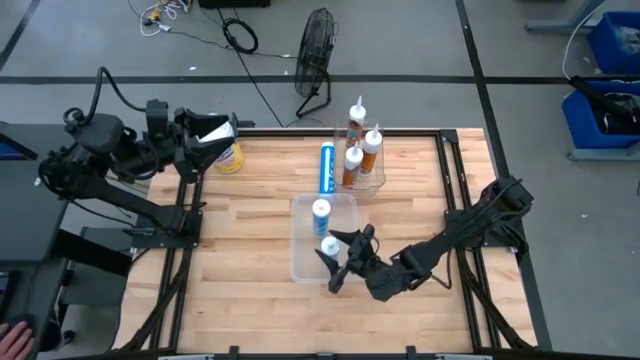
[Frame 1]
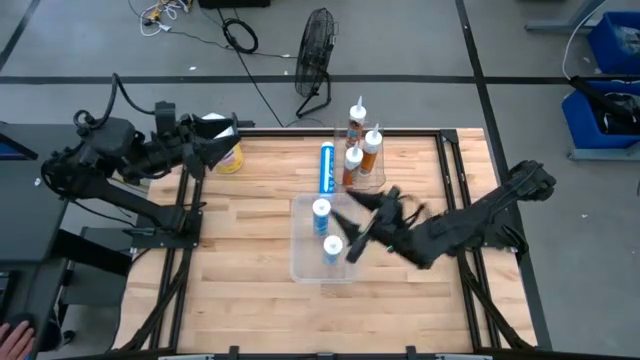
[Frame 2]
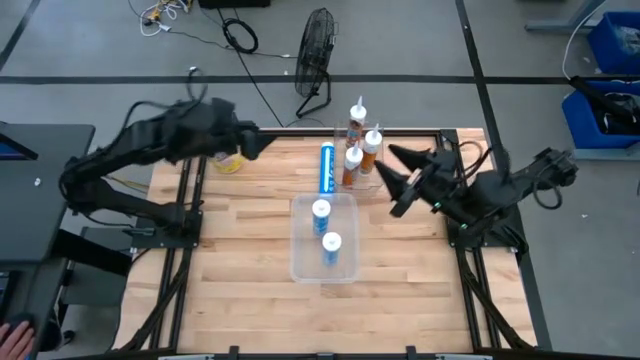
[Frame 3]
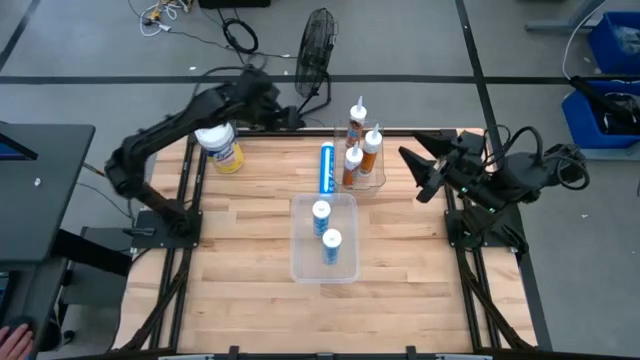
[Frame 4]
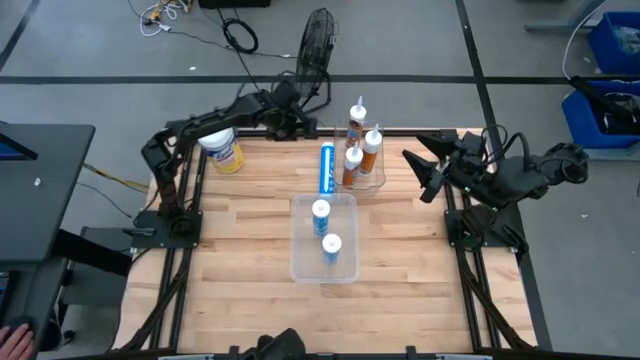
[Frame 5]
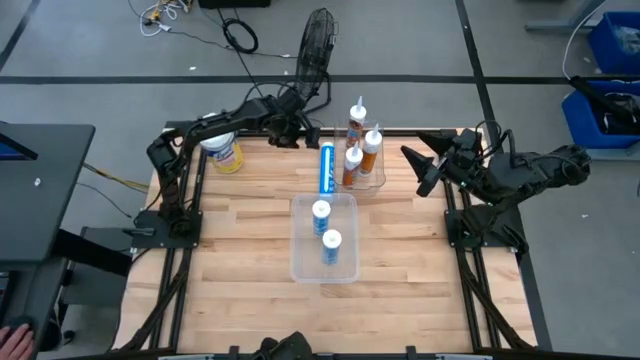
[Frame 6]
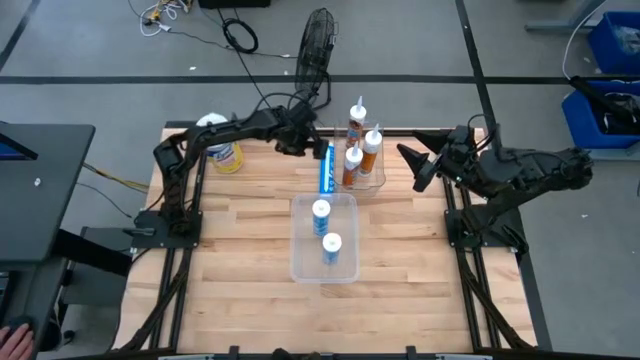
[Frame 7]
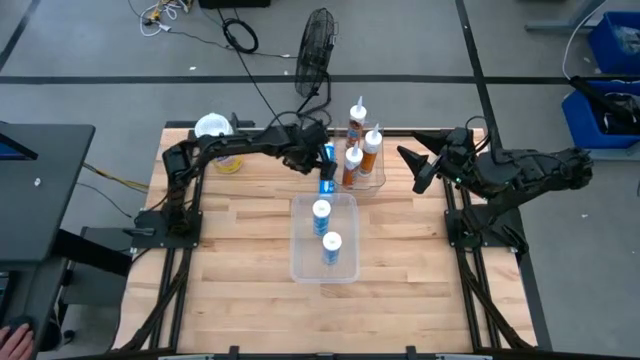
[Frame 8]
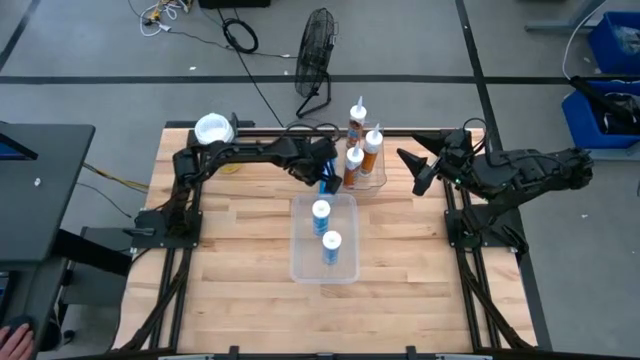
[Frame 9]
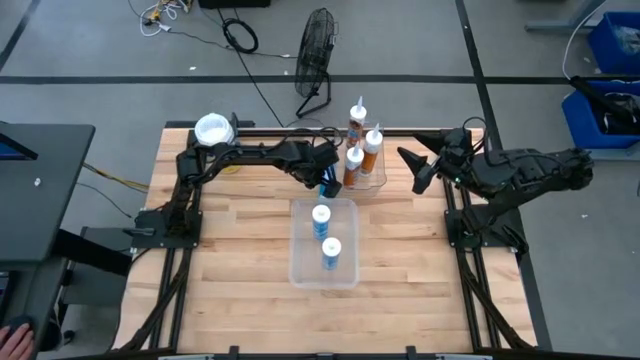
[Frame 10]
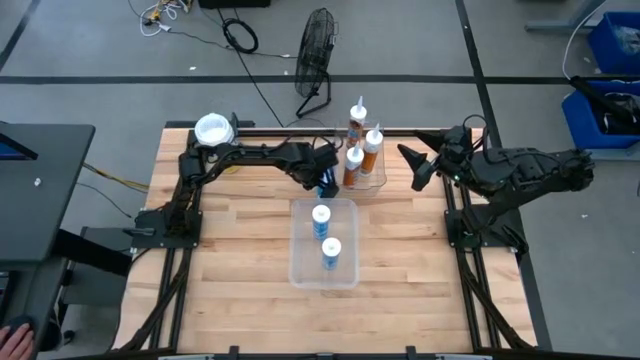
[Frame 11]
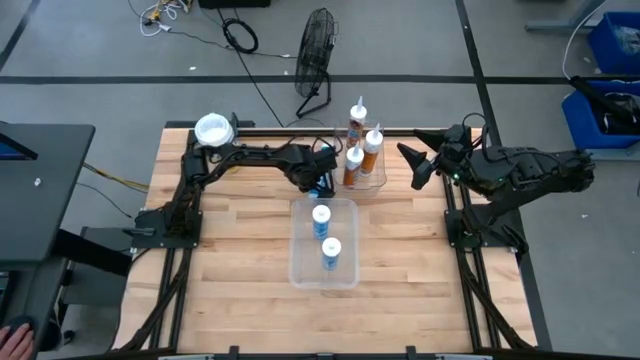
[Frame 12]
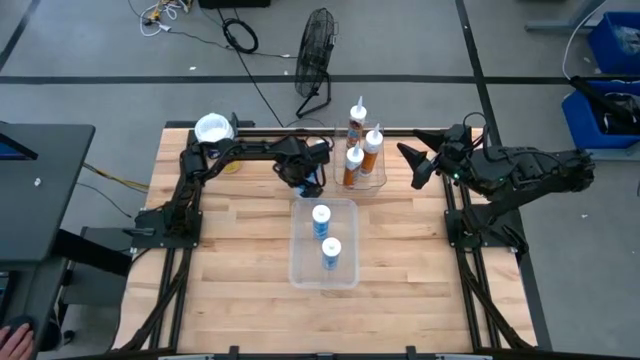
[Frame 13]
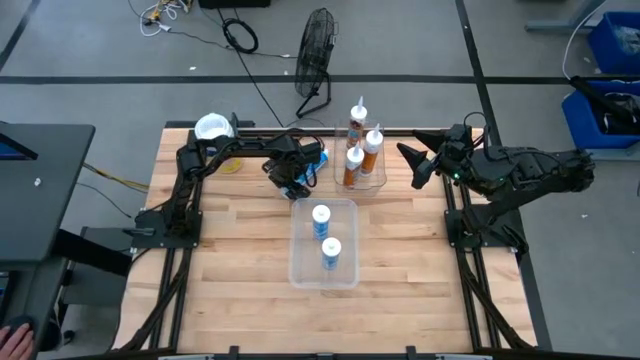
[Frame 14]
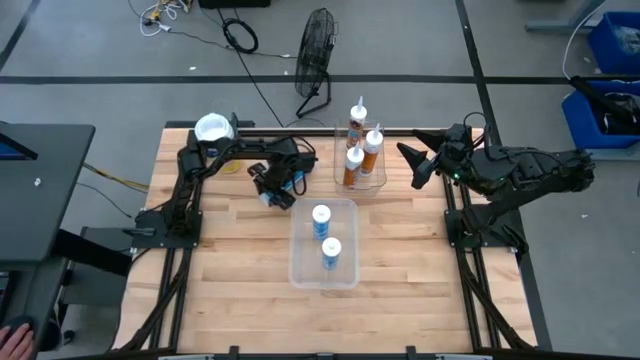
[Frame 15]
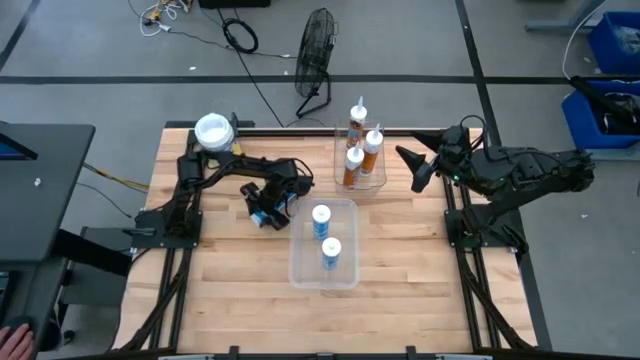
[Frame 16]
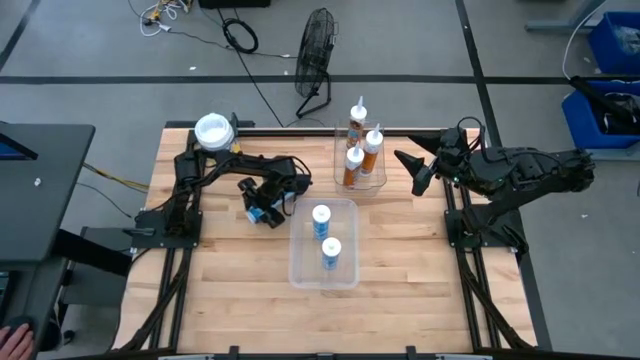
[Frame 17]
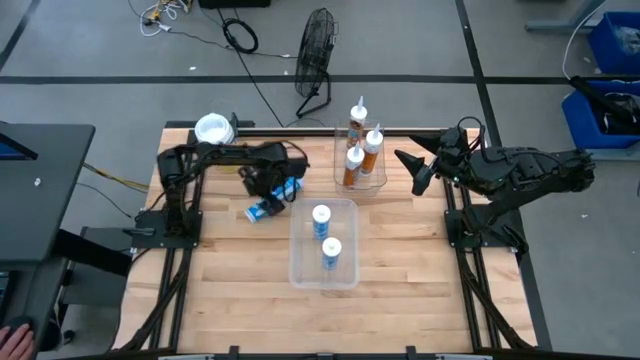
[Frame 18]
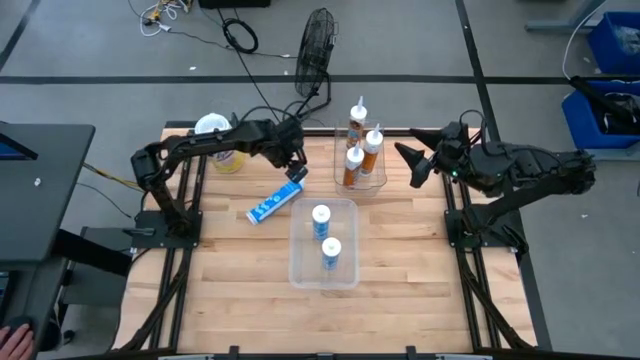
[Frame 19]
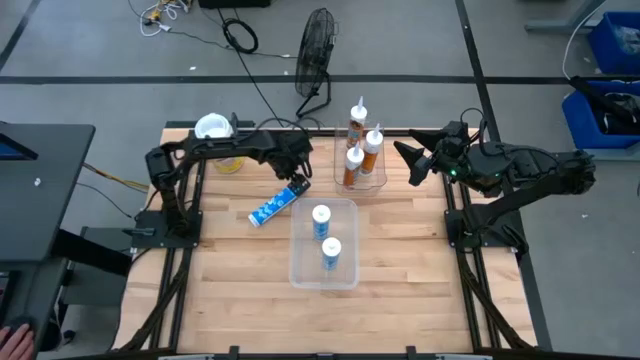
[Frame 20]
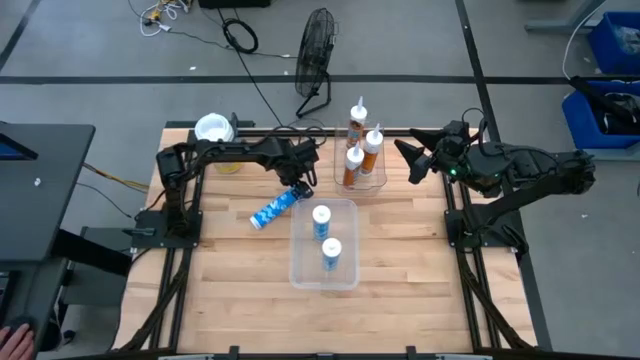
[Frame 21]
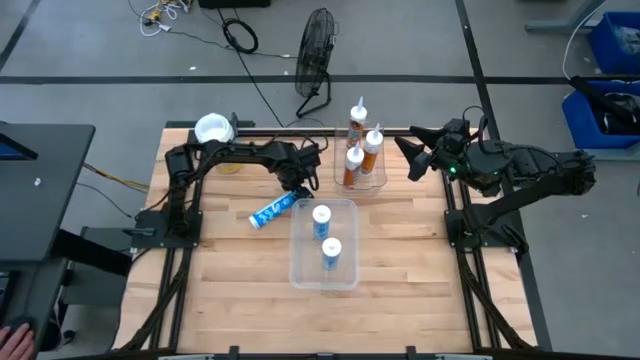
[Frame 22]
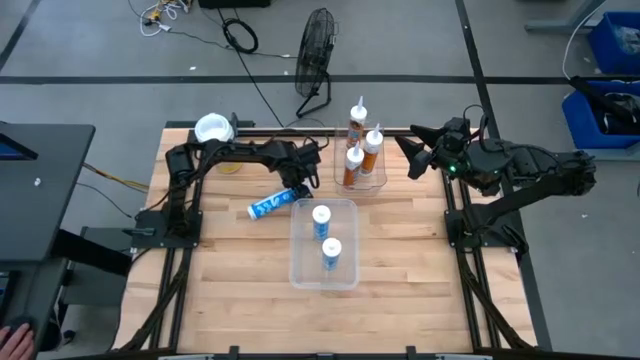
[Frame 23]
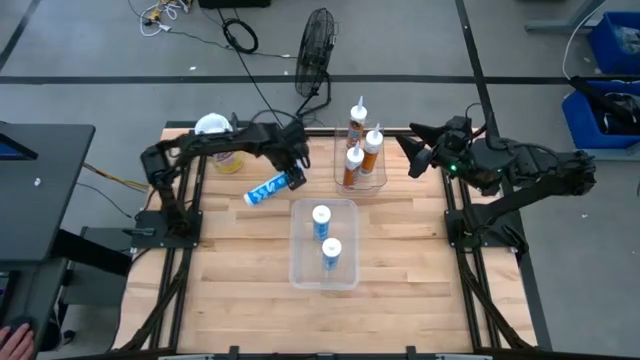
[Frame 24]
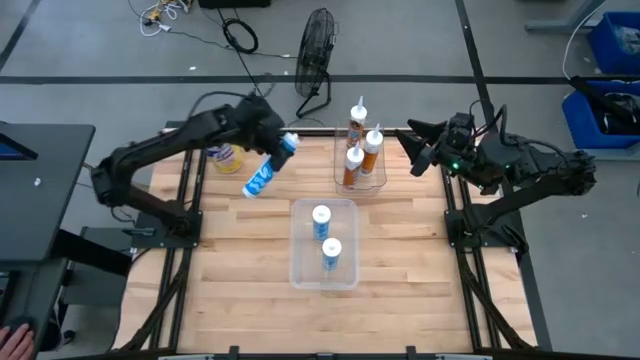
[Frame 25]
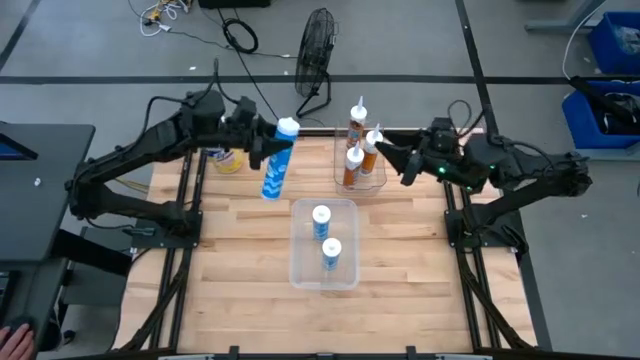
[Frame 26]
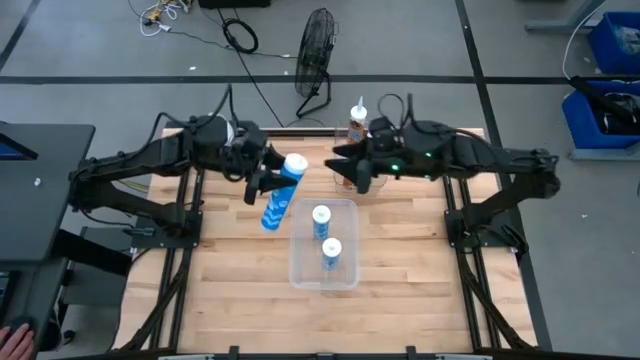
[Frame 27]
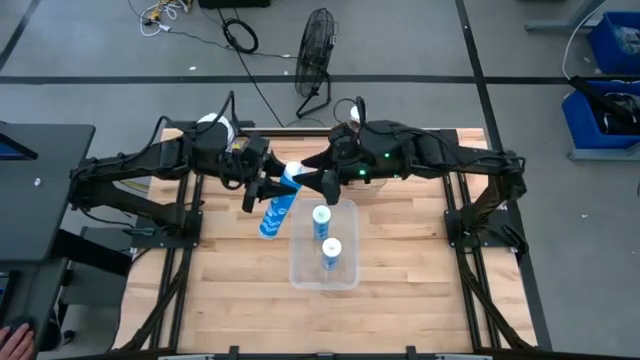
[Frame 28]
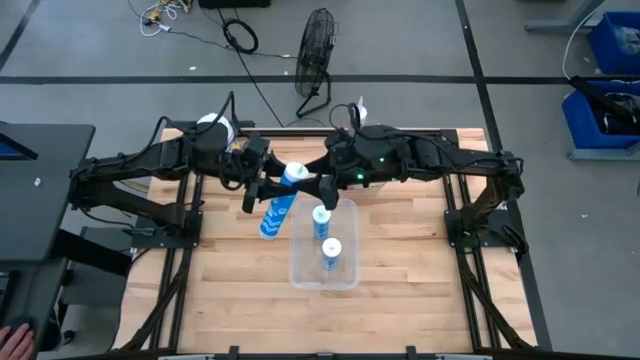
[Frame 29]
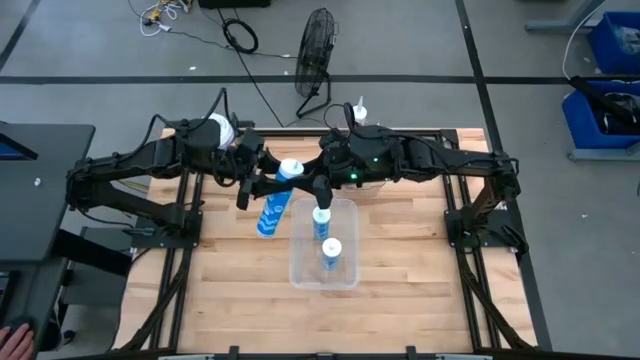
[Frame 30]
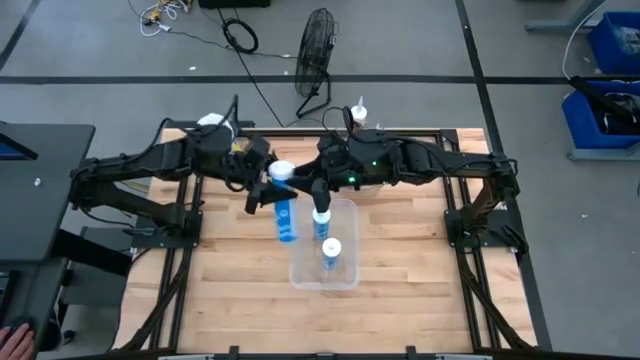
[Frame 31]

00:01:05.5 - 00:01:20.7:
Task: Sort silicone sealant tubes
Put the blue sealant into the bottom transparent bin
